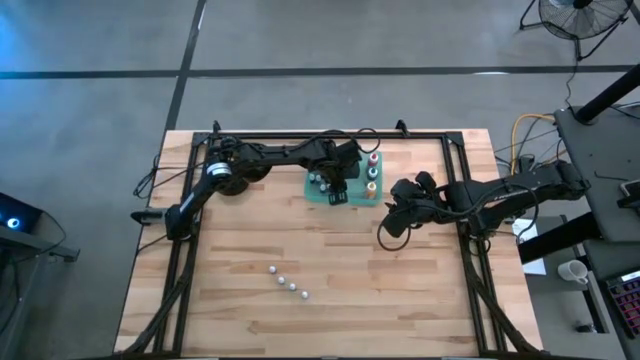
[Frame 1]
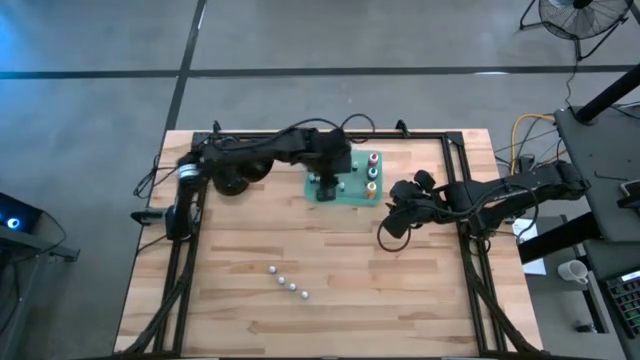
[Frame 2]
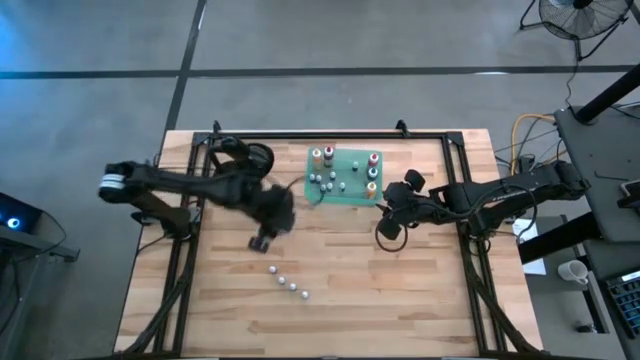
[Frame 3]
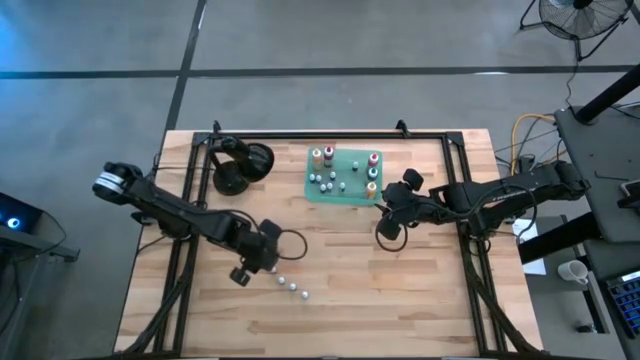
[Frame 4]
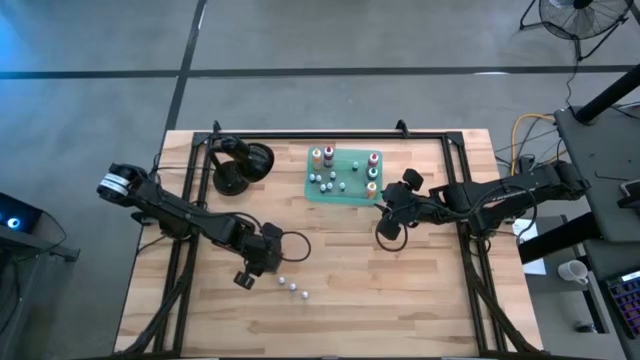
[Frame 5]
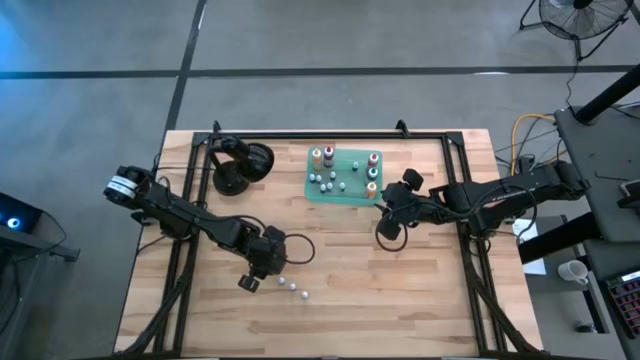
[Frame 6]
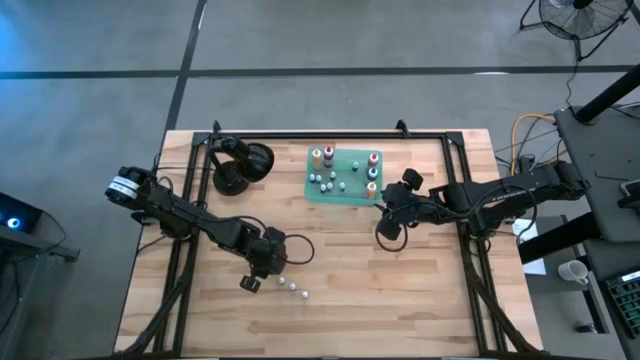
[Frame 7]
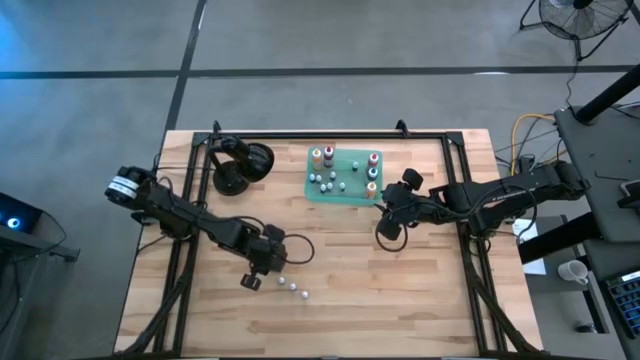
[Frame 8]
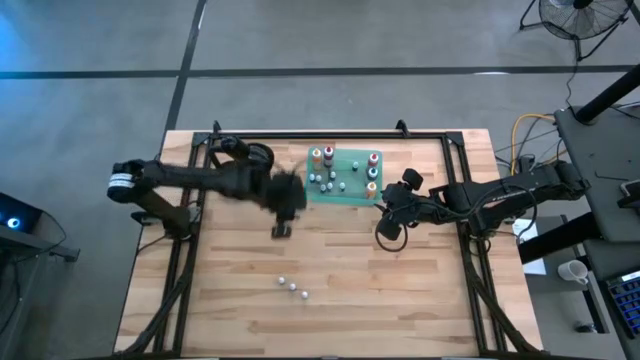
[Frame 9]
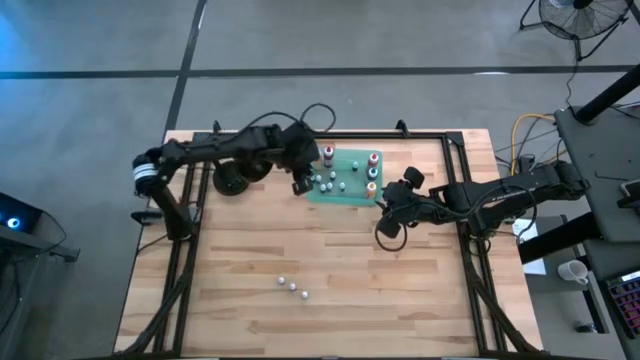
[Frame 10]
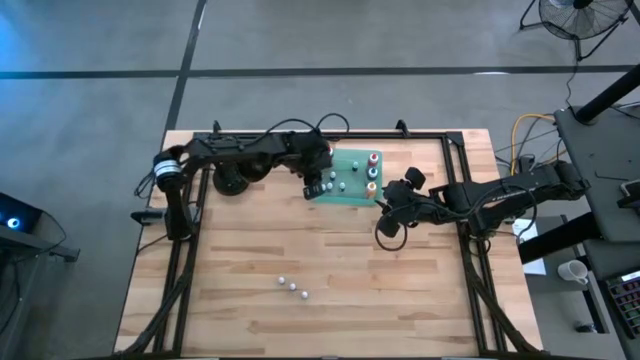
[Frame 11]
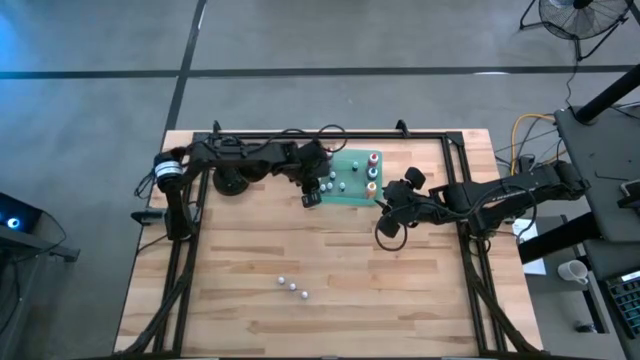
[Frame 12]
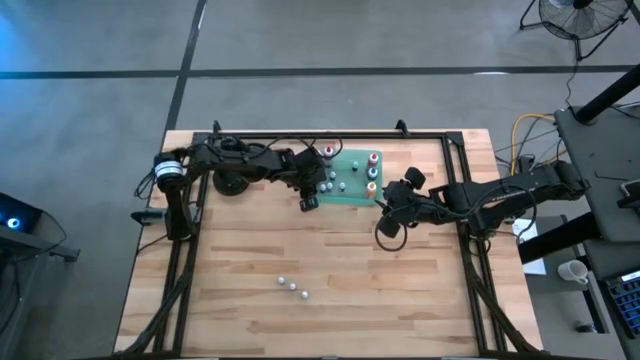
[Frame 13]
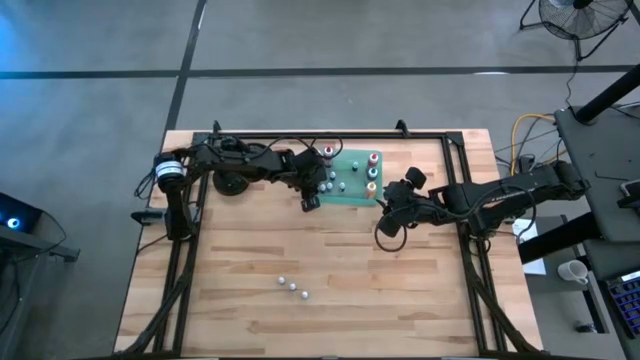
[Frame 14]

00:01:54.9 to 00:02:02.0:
Task: Pick & Place food coloring
Put the small violet food coloring bottle into the green bin

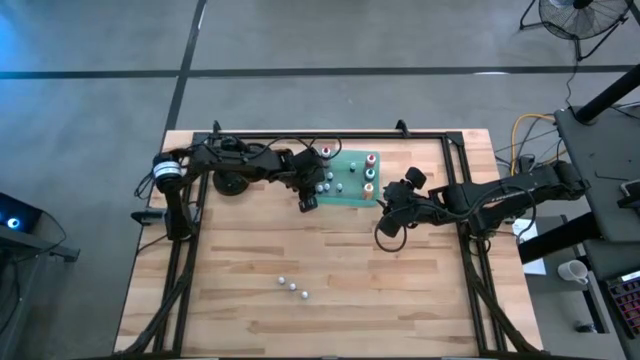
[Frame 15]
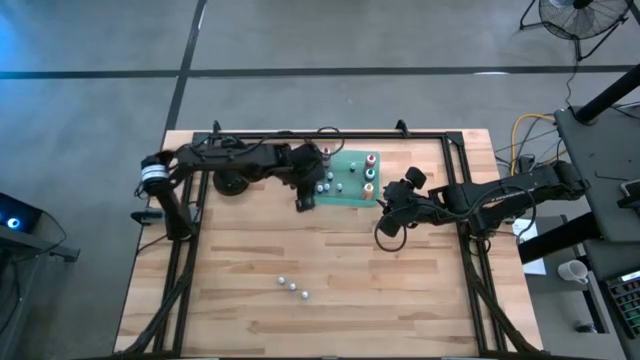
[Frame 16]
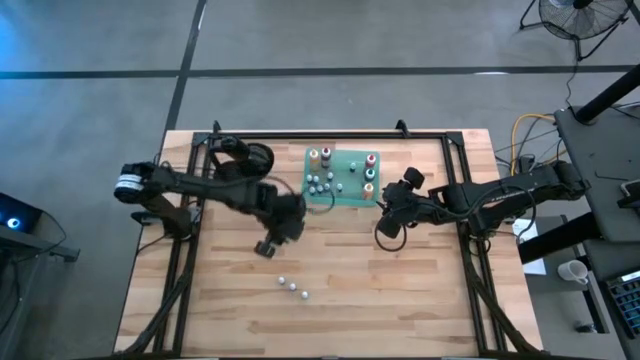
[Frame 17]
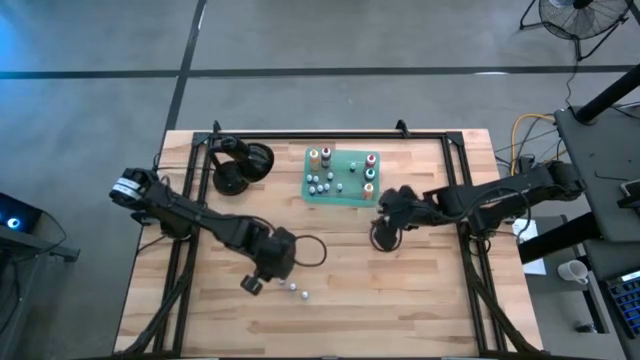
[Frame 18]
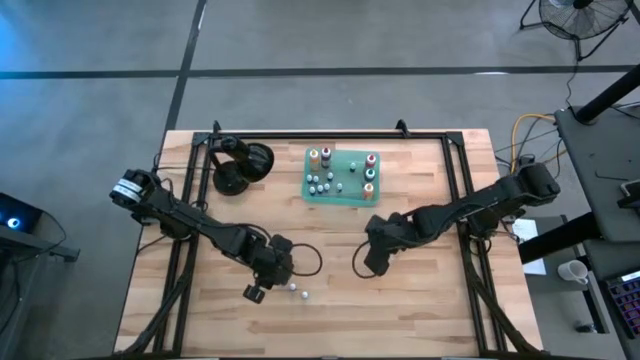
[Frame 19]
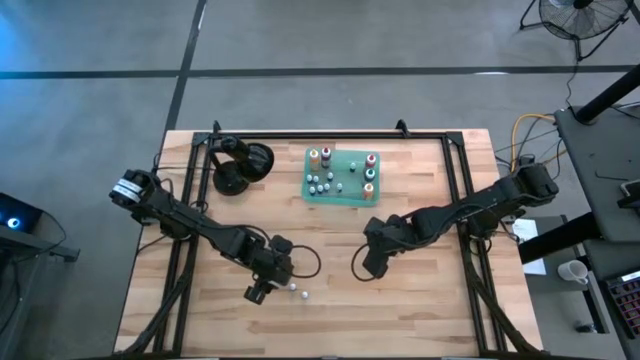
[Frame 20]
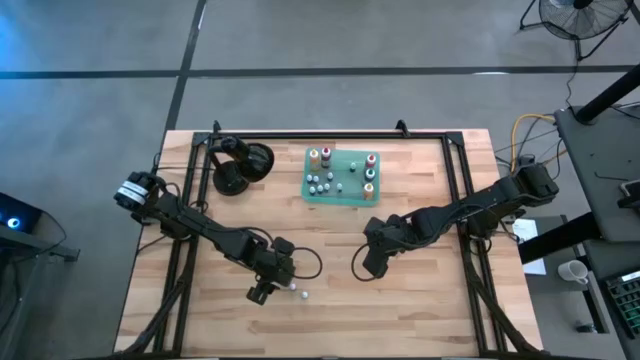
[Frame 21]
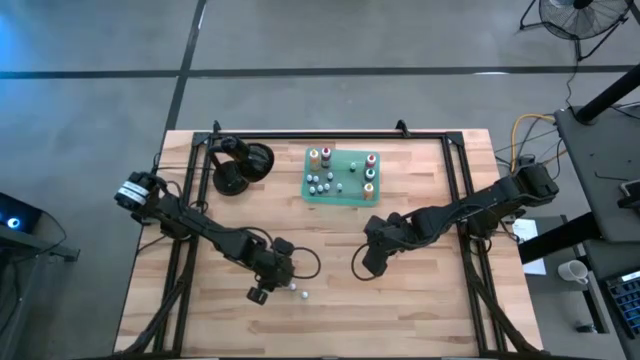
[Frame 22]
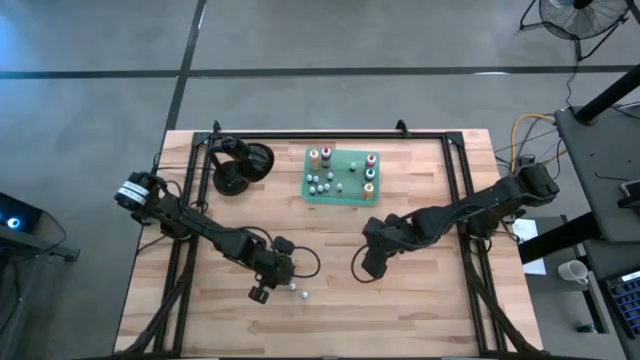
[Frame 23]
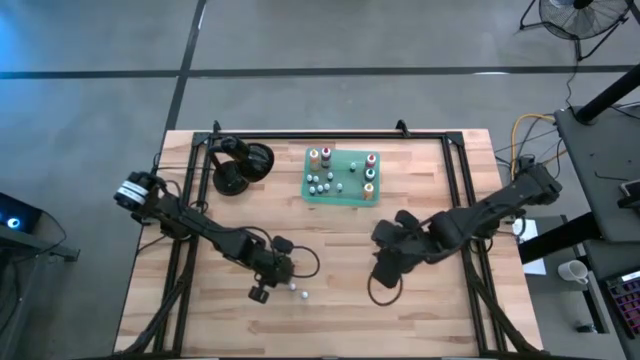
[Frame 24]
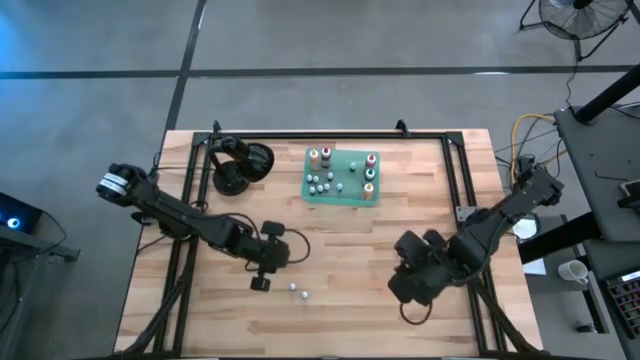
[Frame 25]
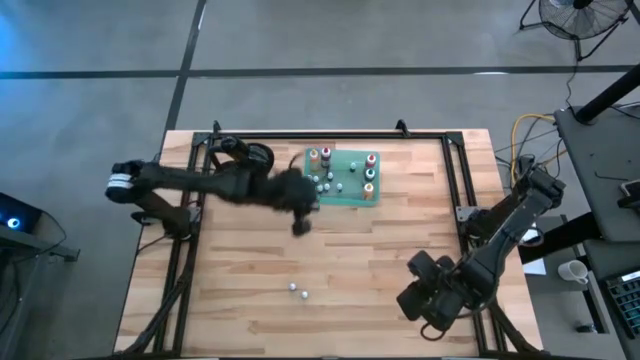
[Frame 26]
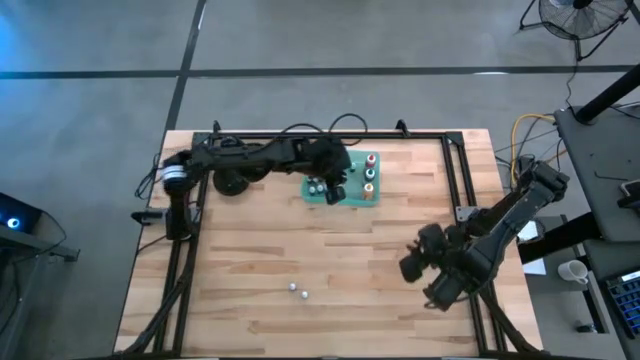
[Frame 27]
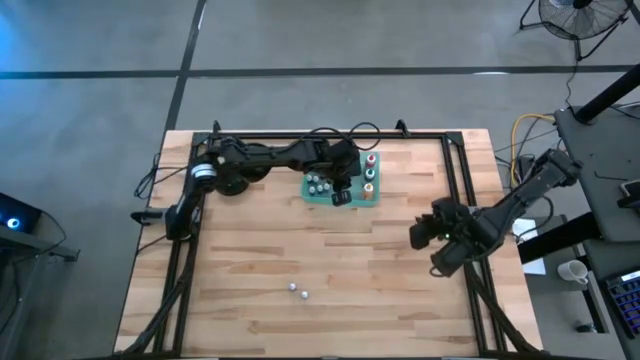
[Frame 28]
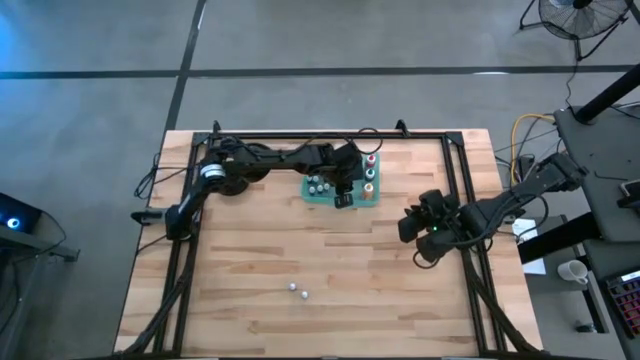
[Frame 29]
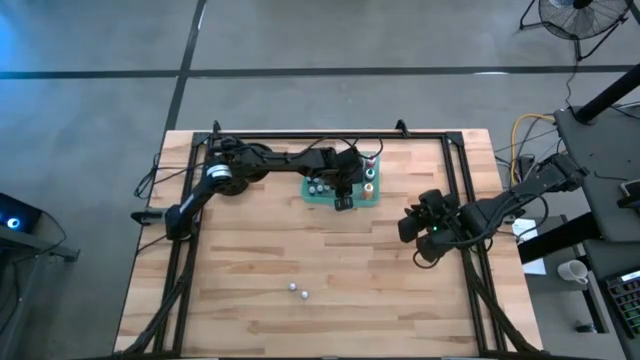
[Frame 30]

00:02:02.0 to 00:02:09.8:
Put the small black food coloring bottle into the green bin

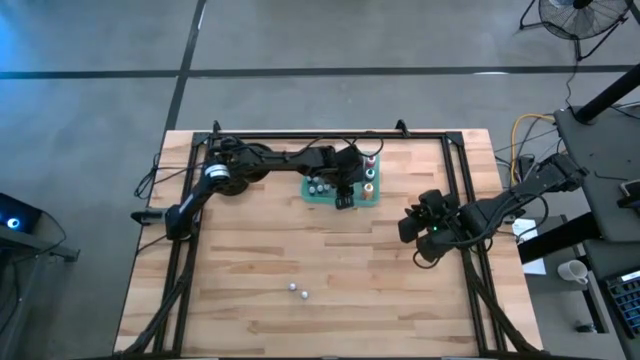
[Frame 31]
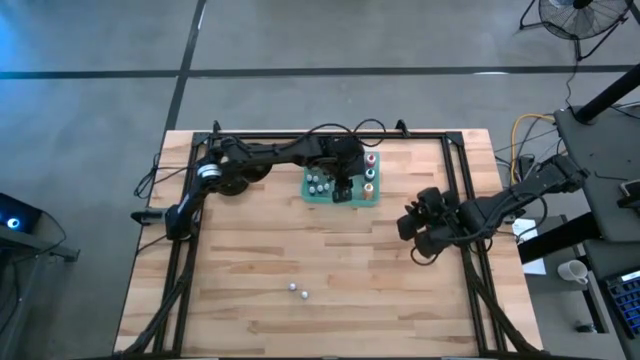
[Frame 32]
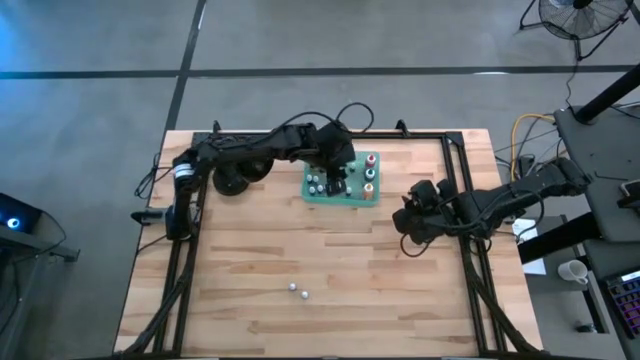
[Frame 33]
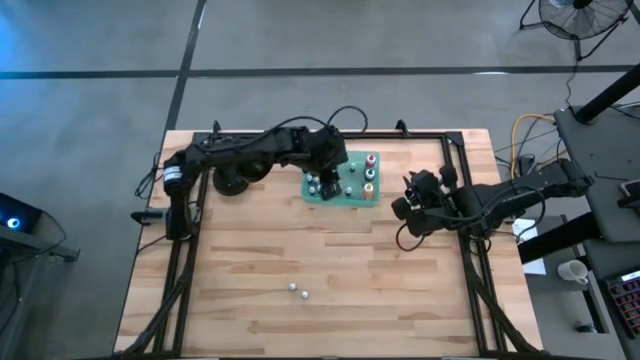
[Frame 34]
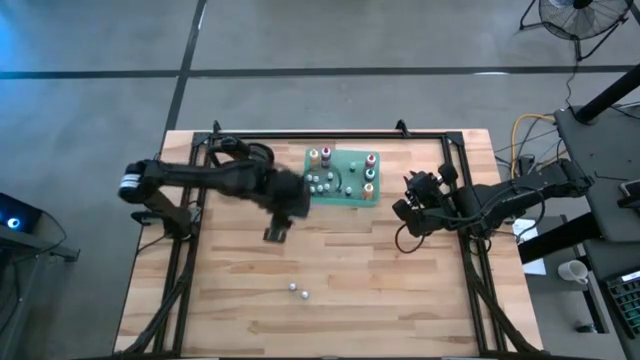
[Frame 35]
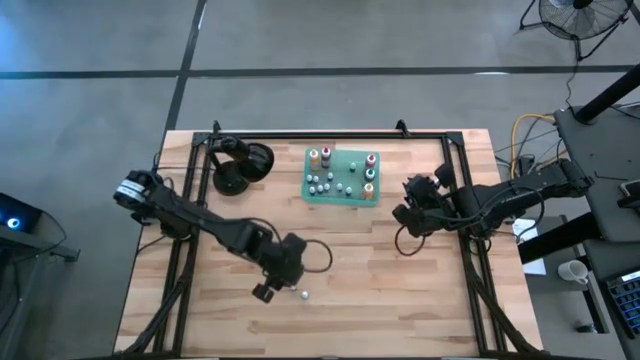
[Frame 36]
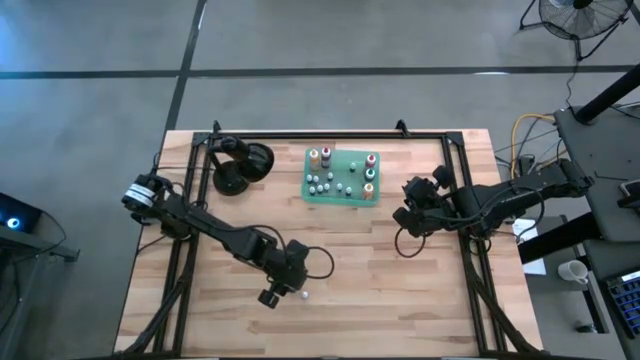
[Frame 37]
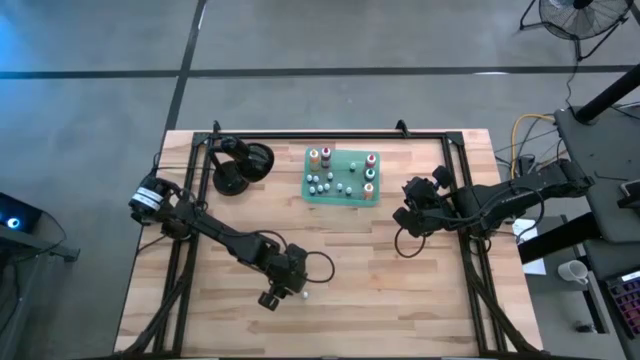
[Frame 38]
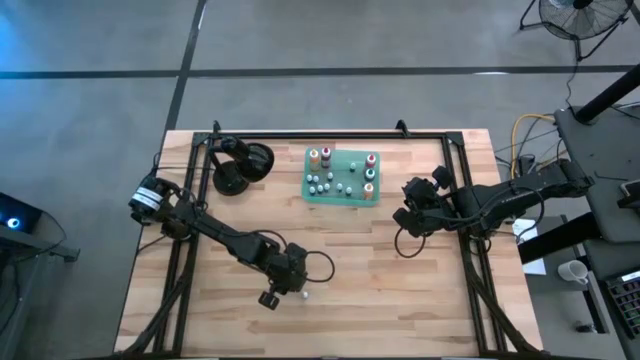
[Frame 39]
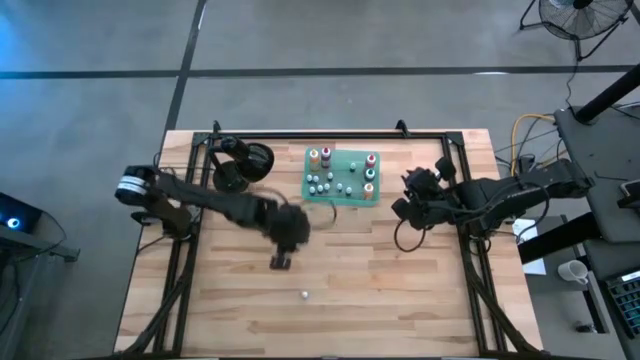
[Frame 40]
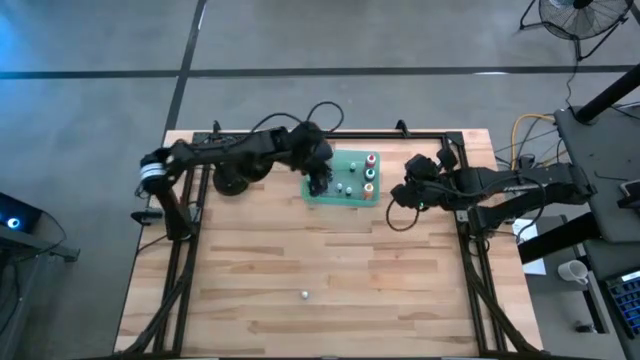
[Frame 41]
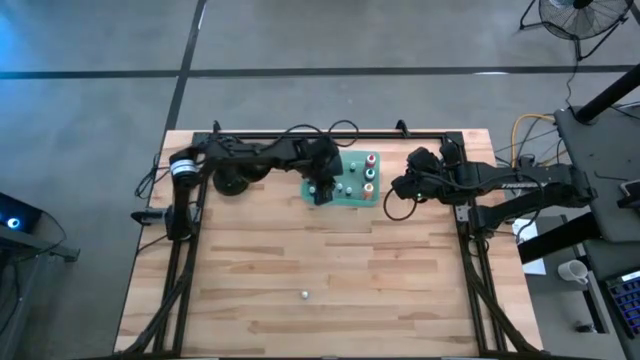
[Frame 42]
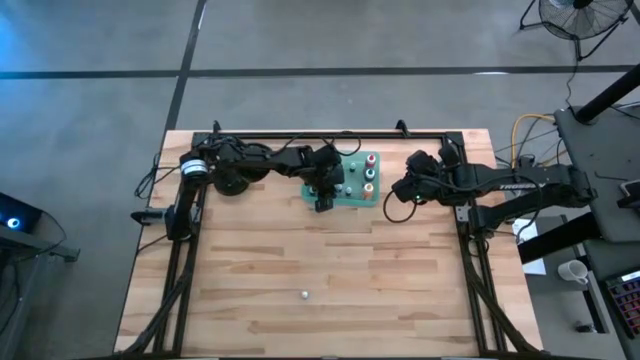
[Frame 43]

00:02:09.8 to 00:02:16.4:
Put the small red food coloring bottle into the green bin
